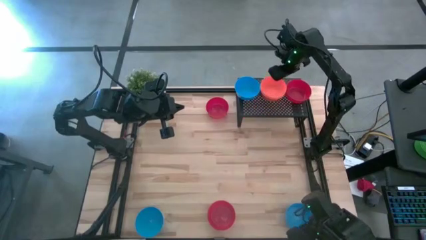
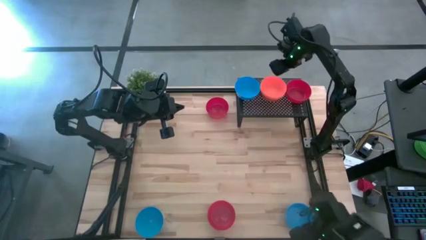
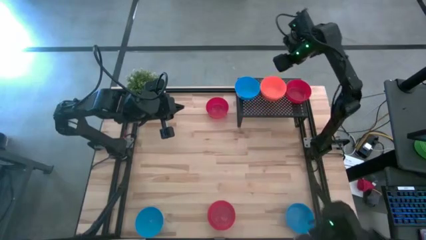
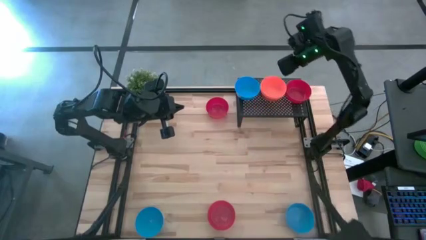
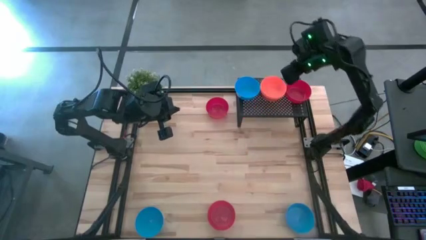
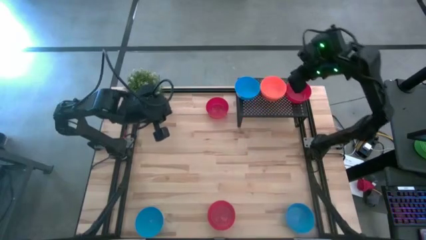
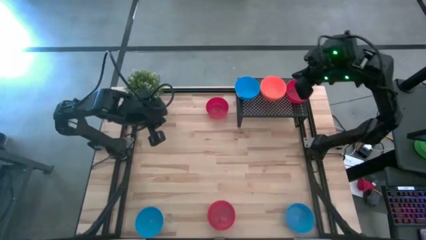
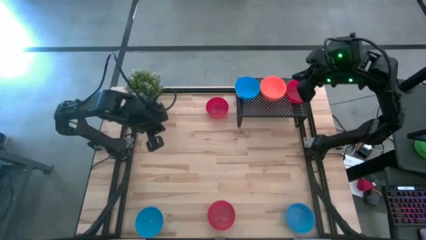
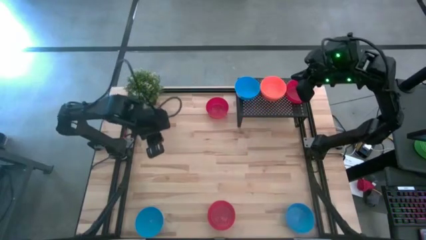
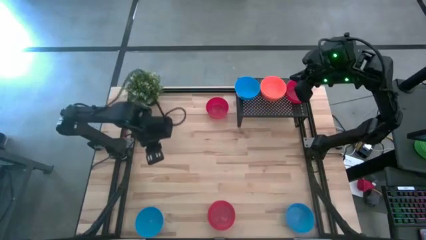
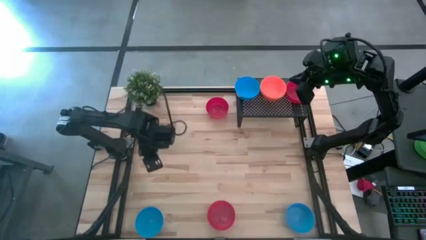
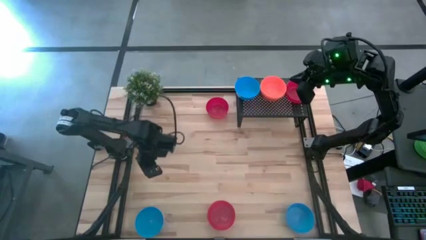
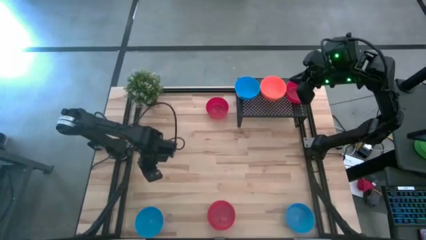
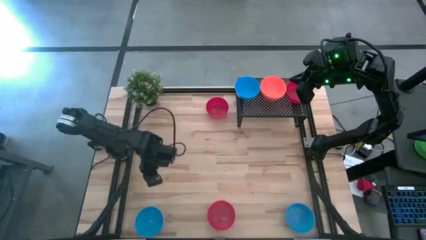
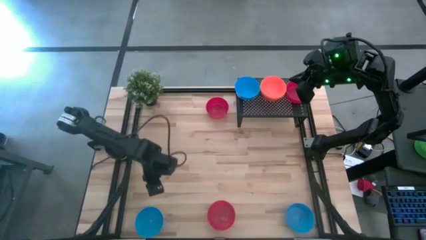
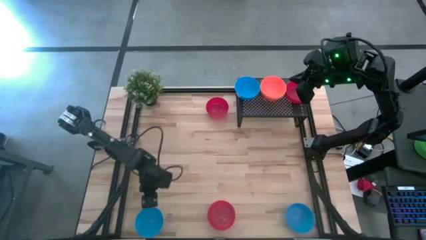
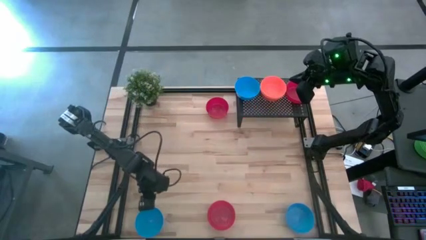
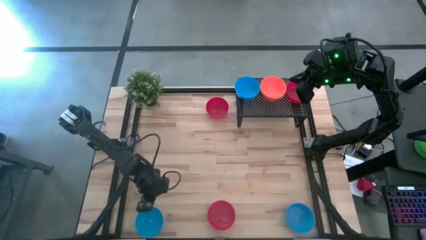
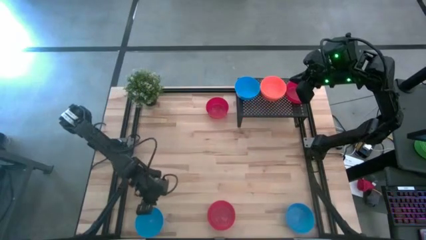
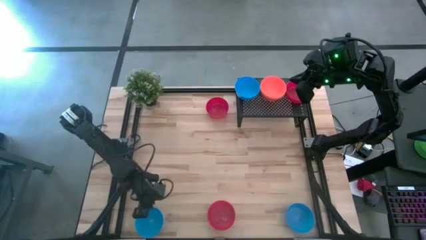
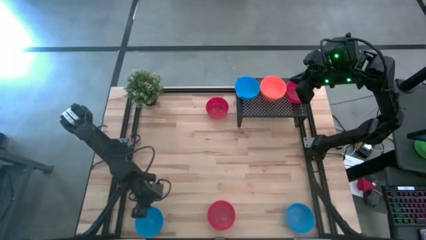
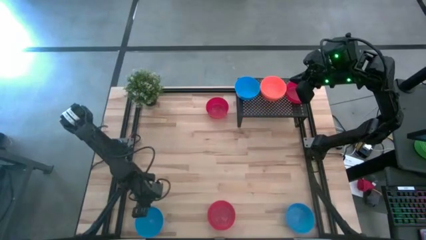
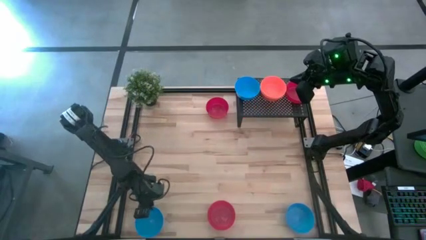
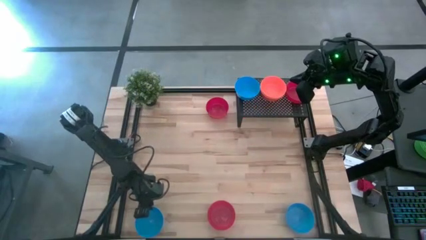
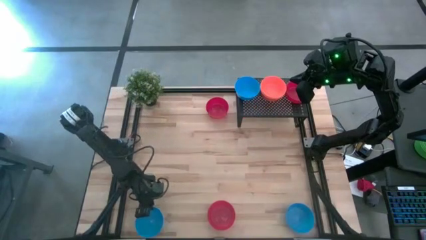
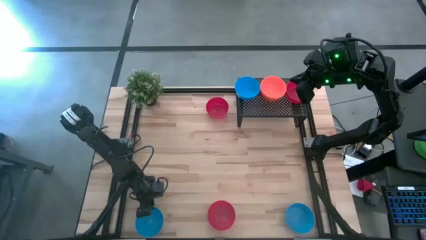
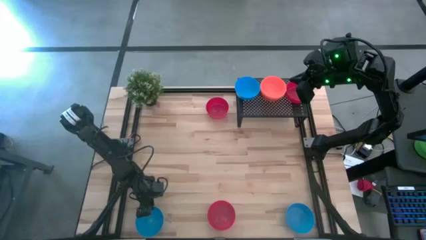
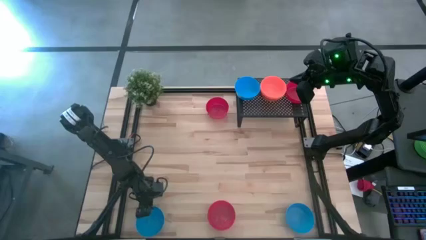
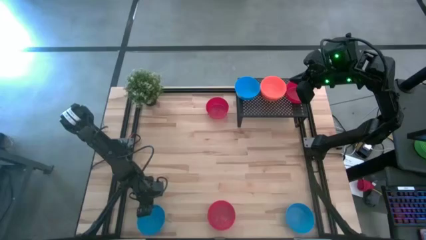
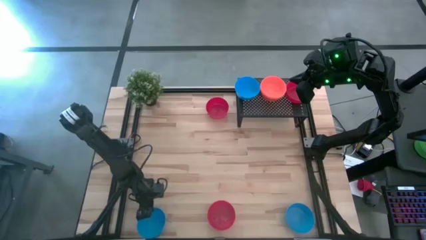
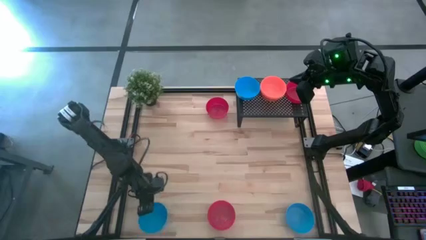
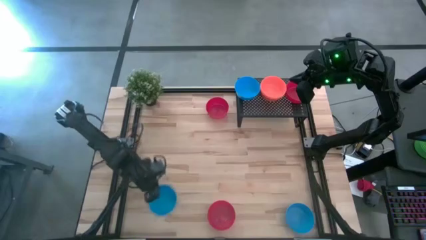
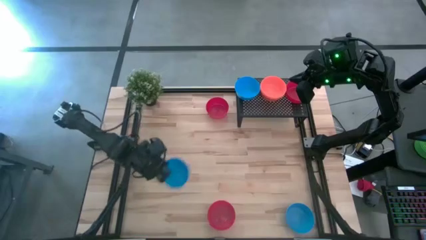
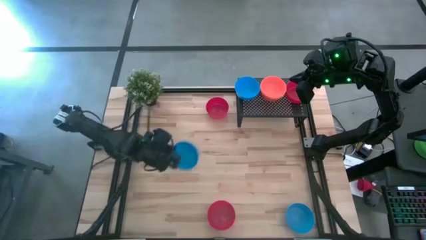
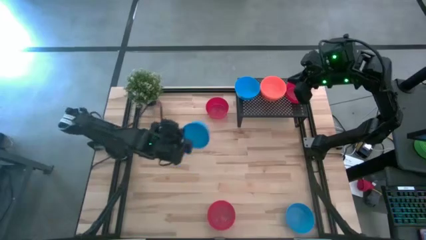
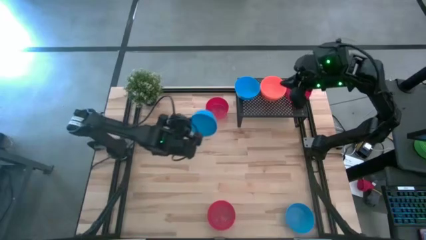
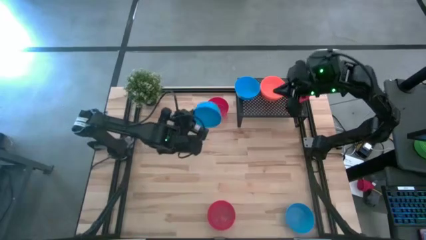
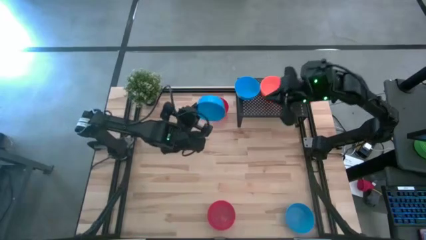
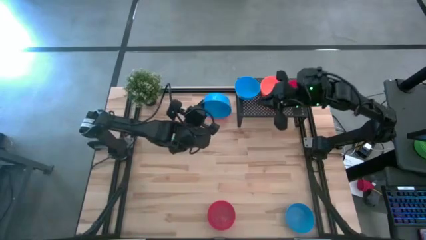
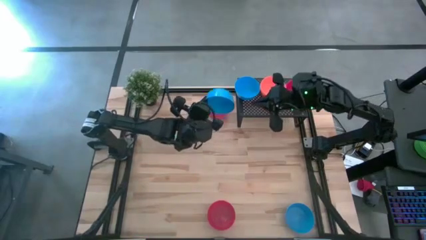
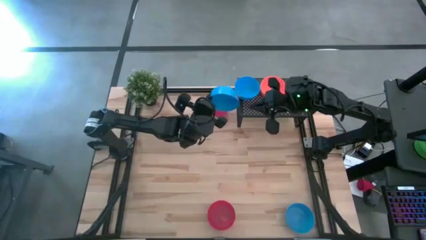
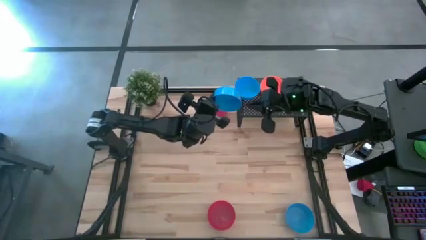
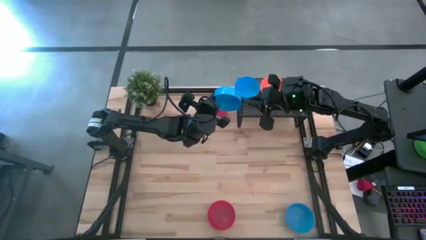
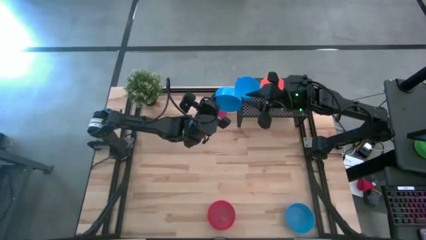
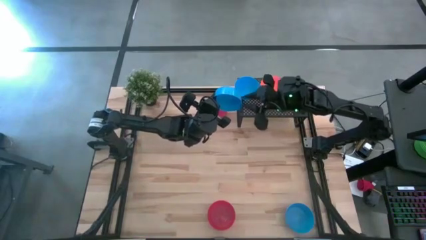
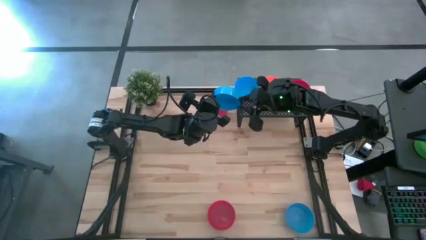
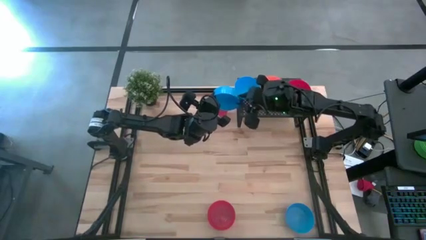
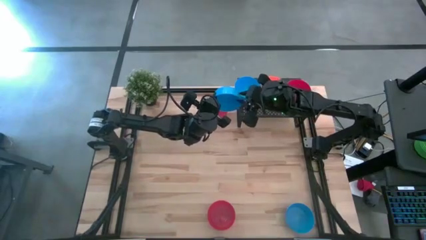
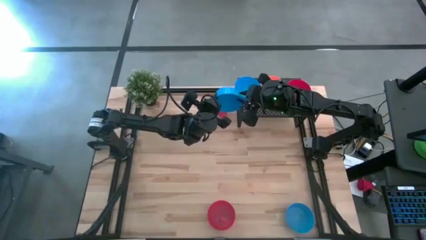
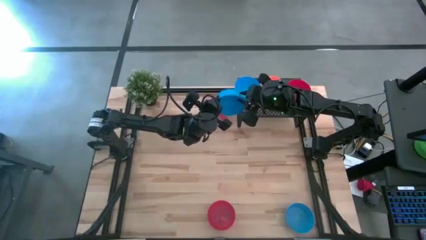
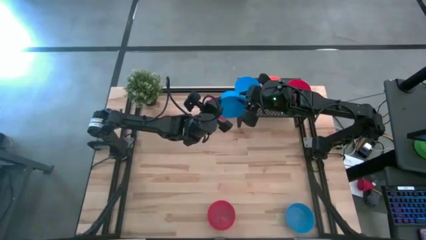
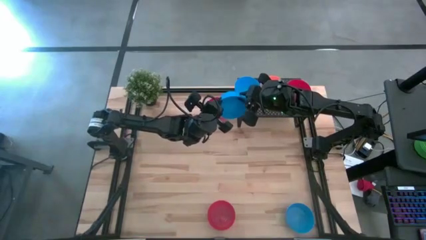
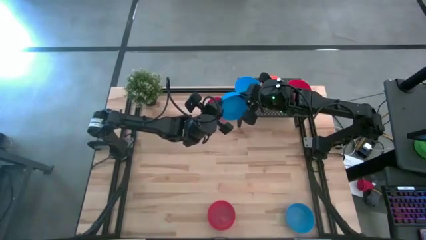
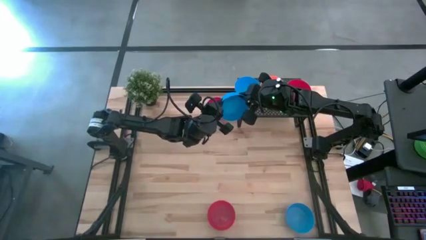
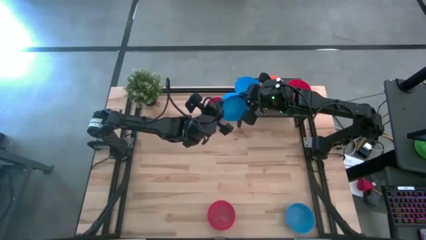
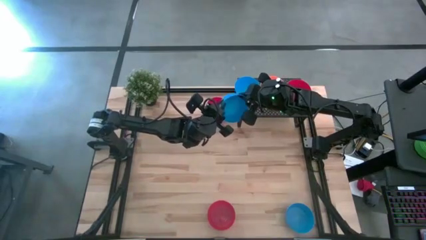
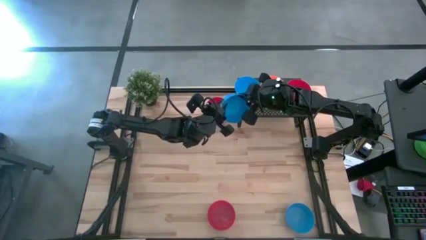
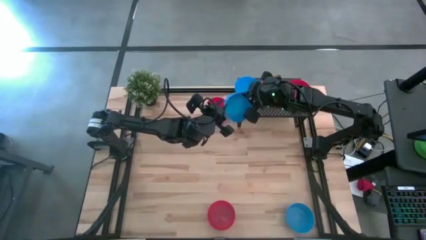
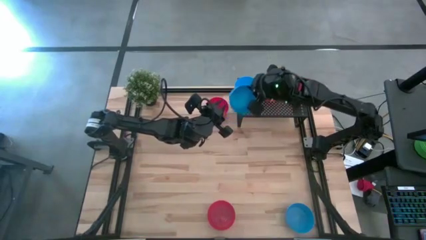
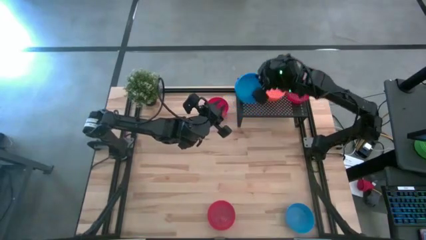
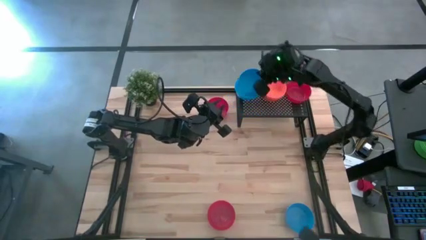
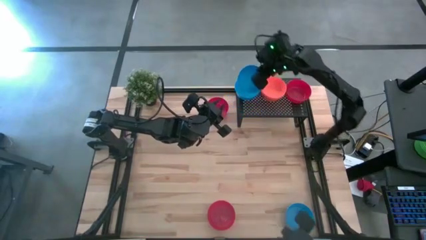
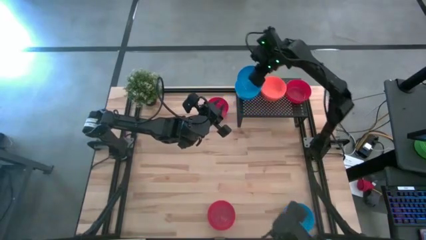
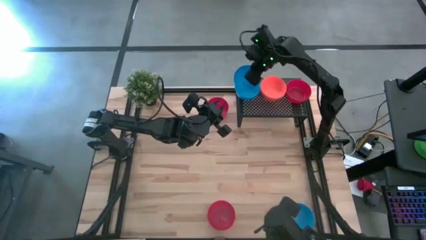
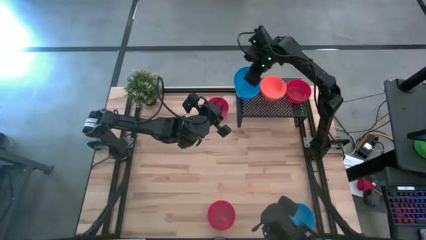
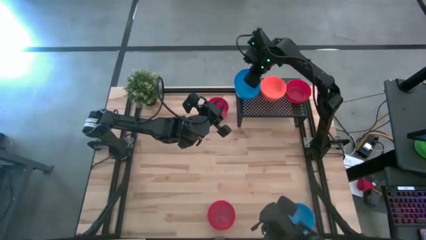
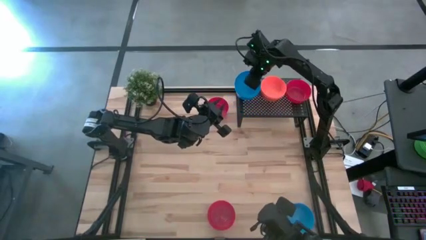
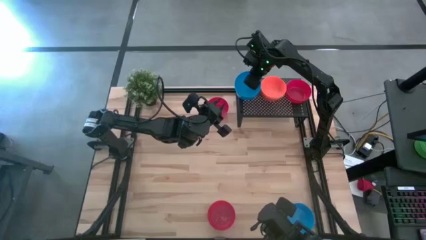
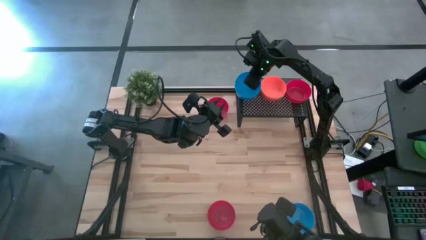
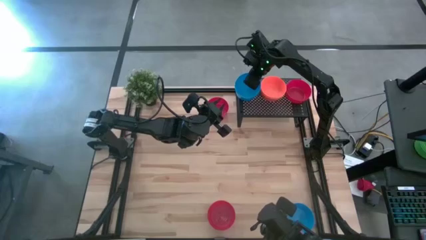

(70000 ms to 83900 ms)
Task: Pick & Place Mini bowls
Stack the bottom blue bowl on the blue bowl

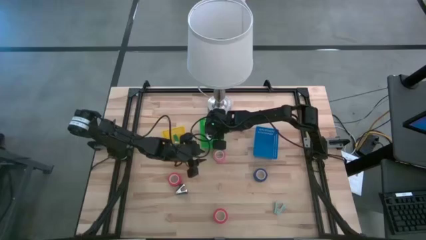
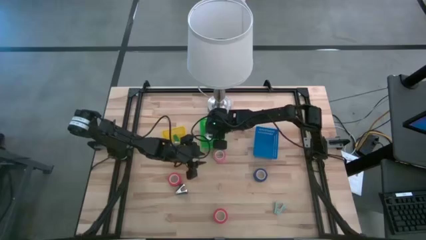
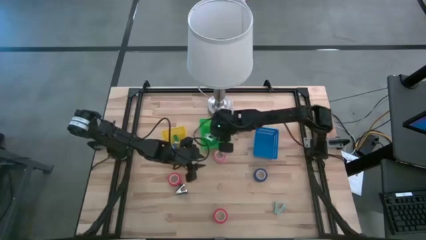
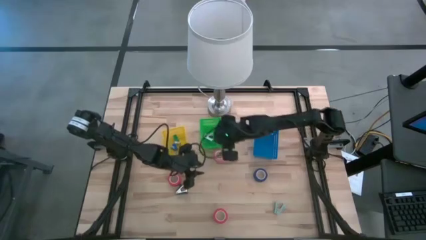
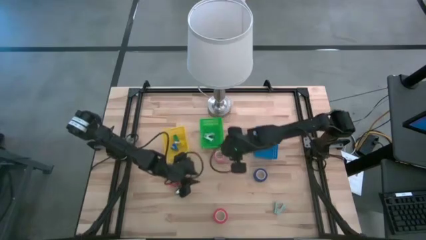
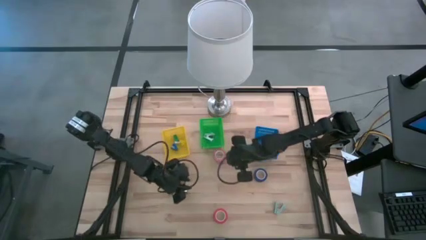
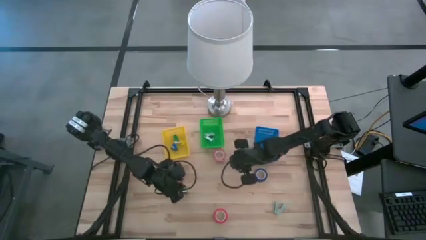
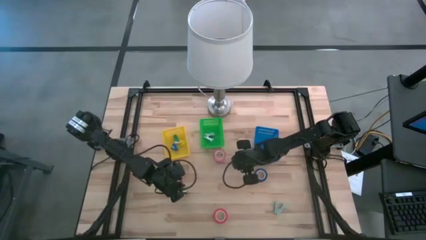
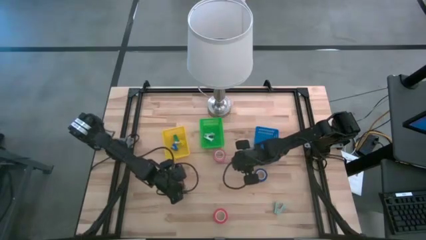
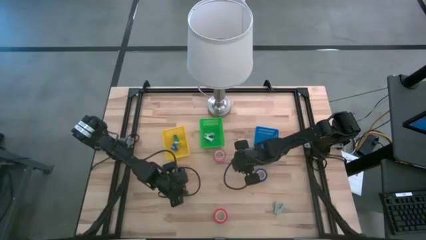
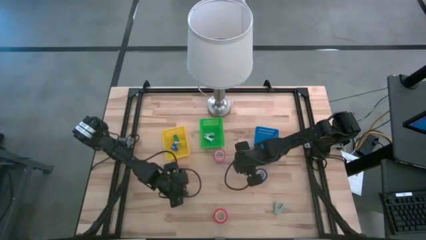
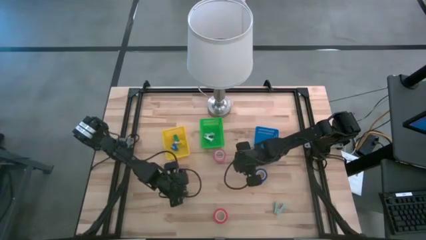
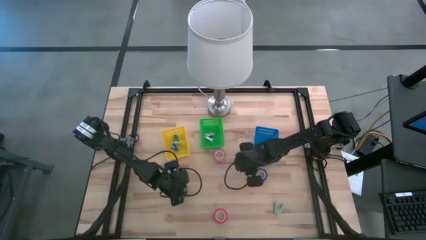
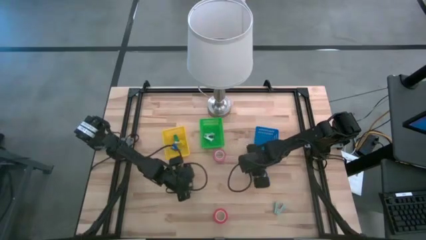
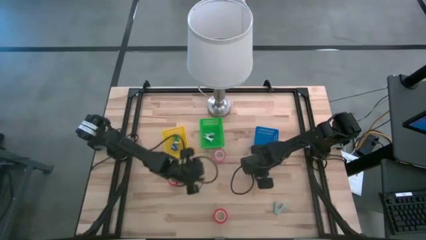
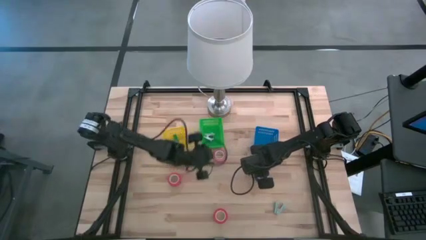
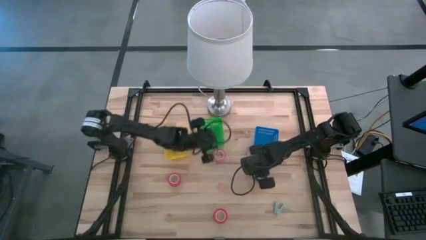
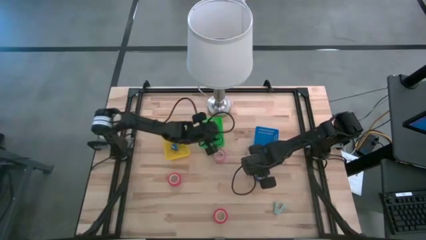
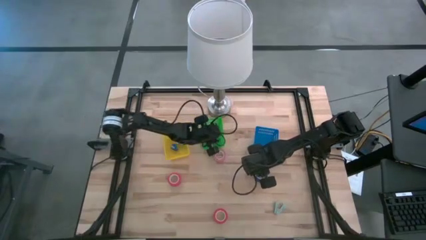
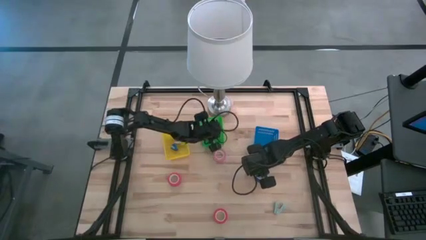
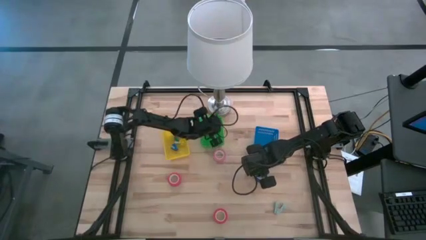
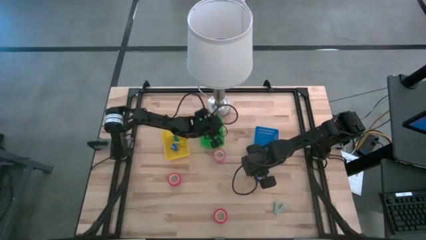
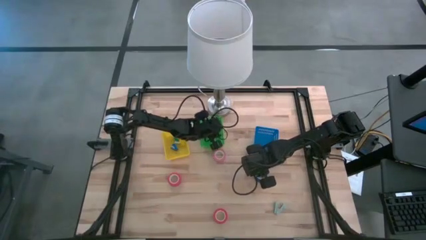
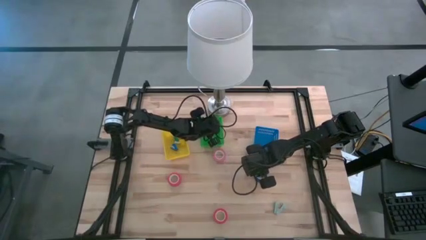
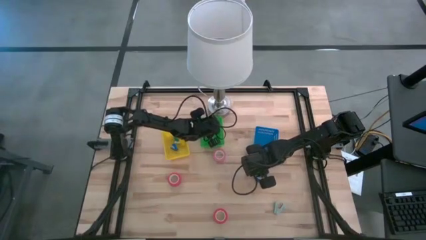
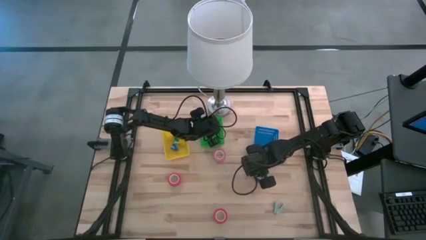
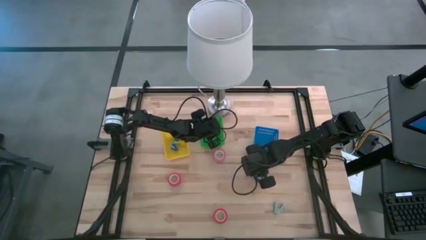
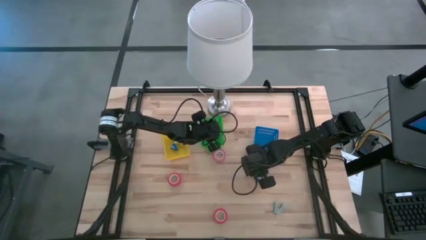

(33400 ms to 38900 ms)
Task: Pick and place Stapler, Stapler remover, tape
Put the black staple remover into the green bin
